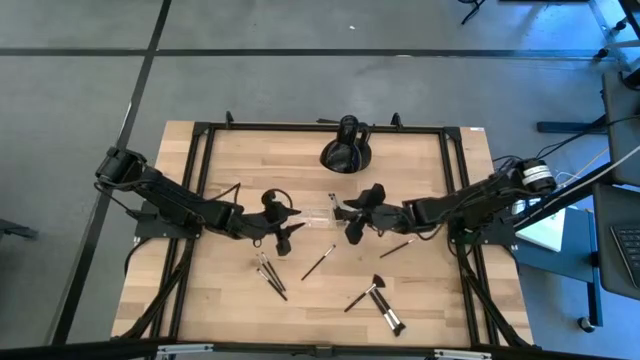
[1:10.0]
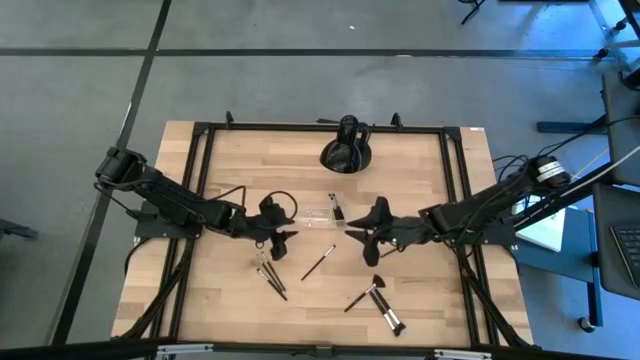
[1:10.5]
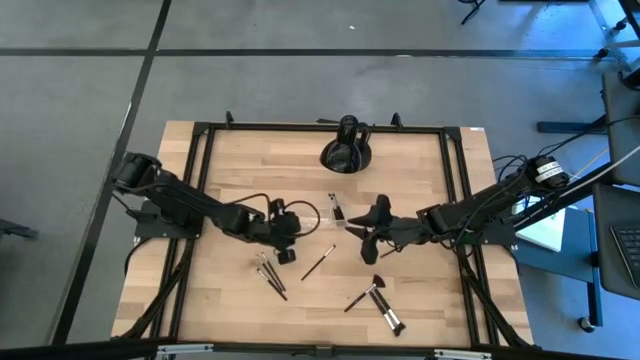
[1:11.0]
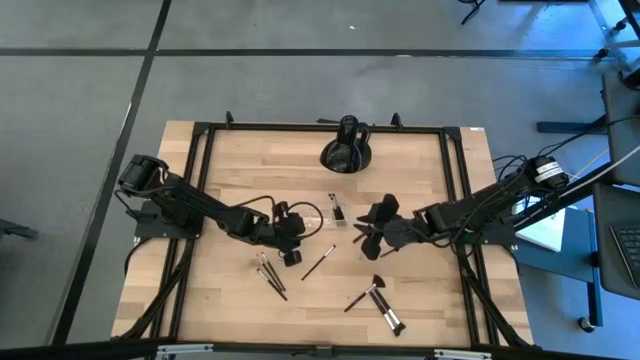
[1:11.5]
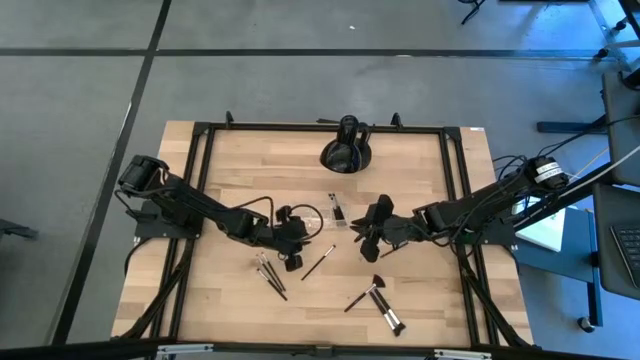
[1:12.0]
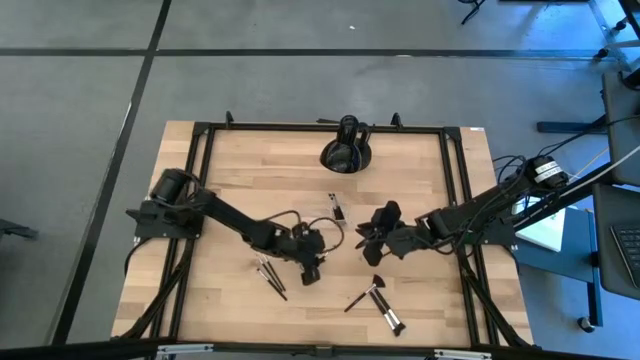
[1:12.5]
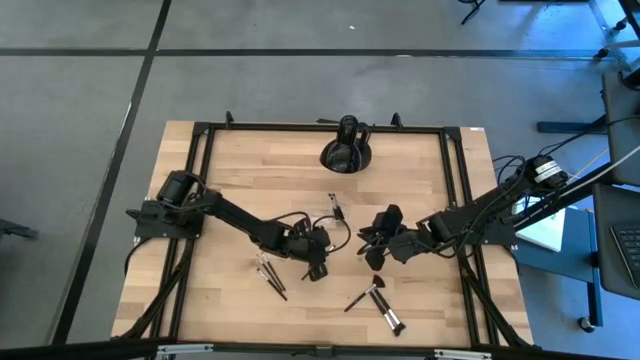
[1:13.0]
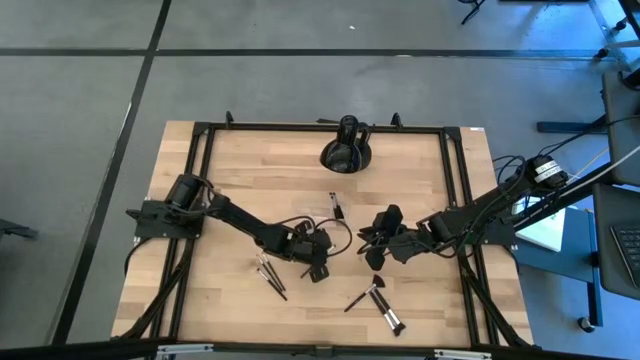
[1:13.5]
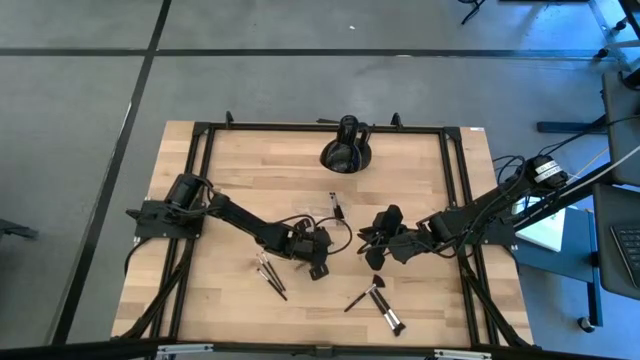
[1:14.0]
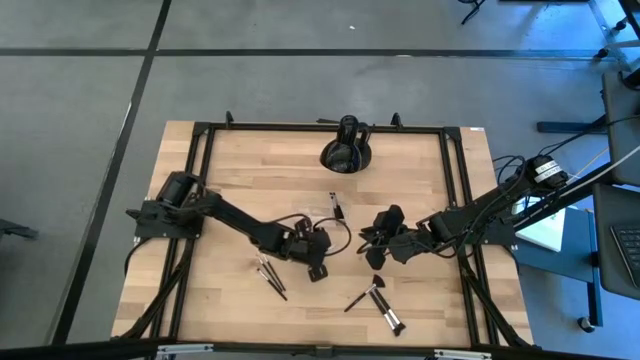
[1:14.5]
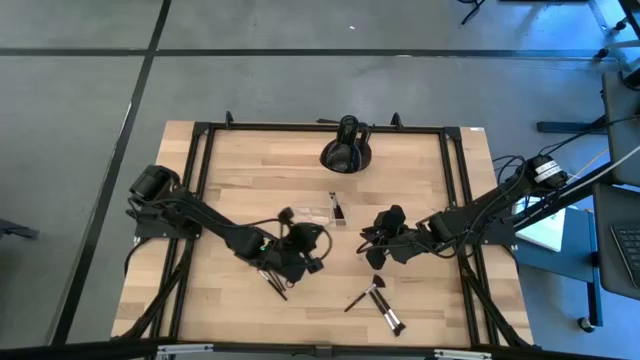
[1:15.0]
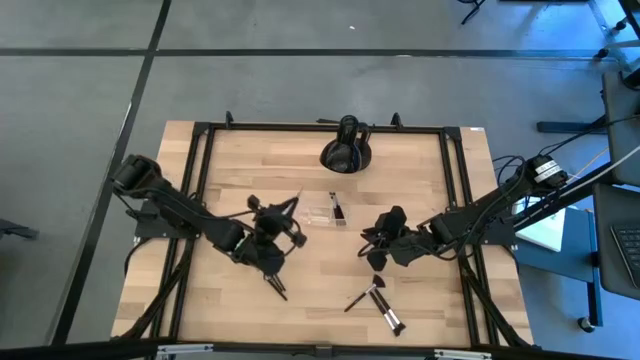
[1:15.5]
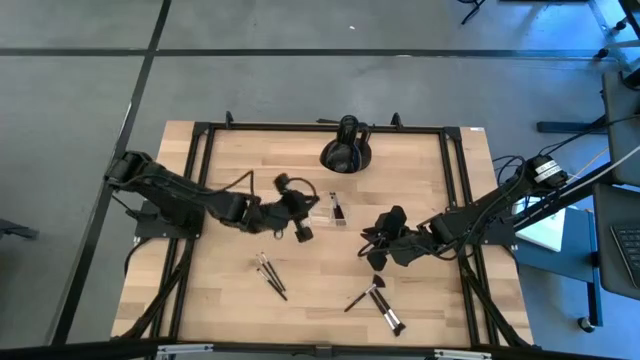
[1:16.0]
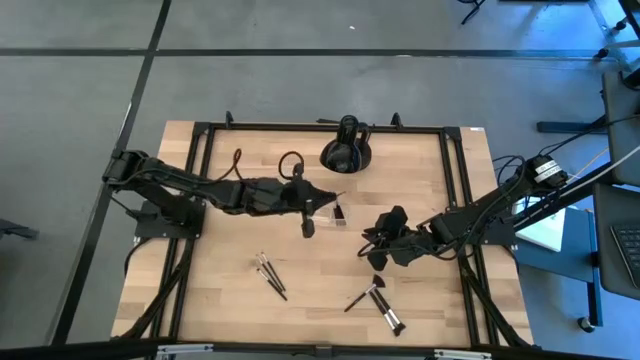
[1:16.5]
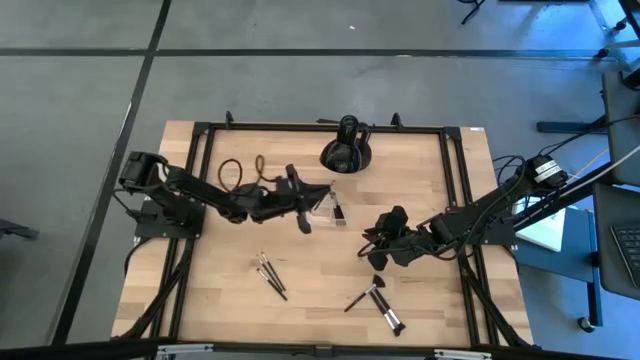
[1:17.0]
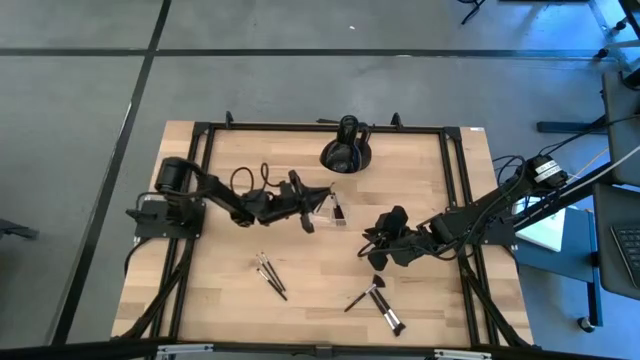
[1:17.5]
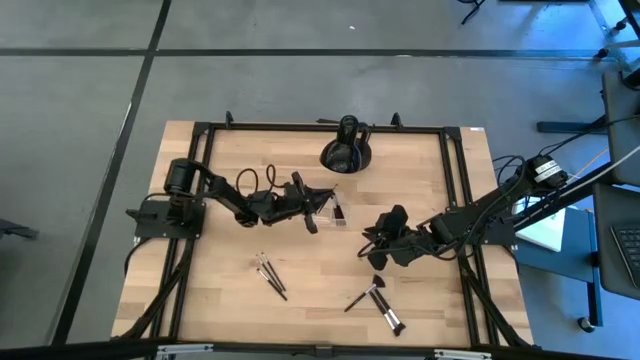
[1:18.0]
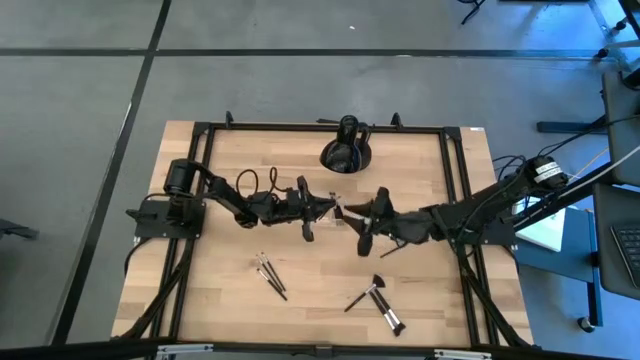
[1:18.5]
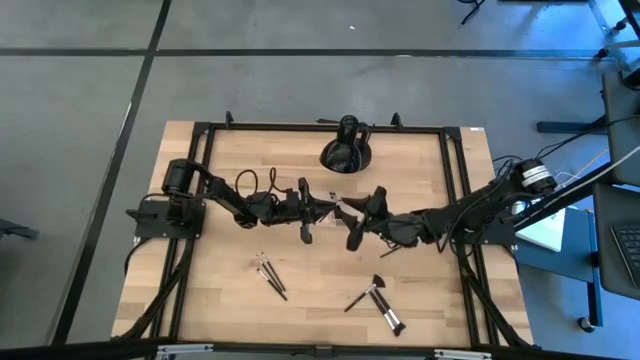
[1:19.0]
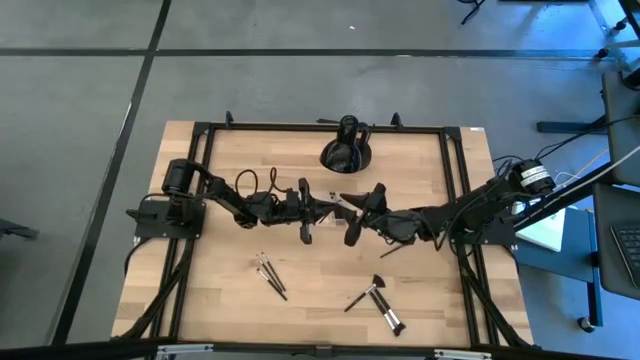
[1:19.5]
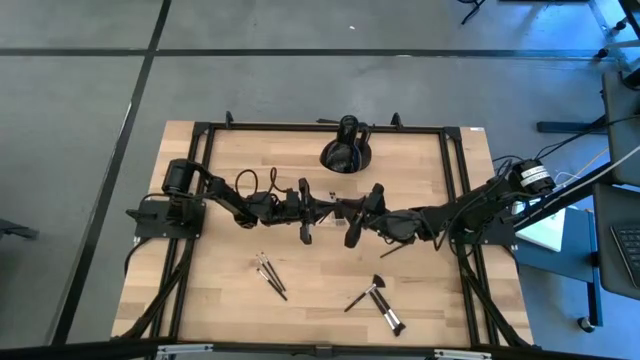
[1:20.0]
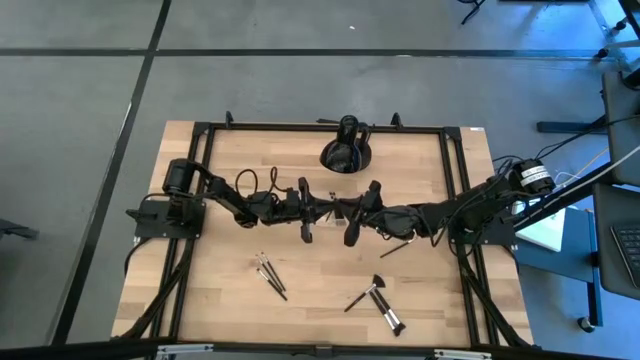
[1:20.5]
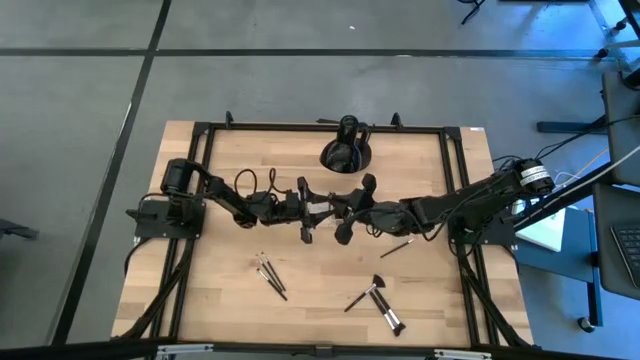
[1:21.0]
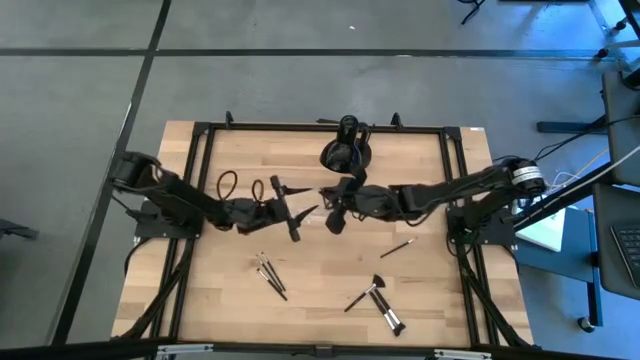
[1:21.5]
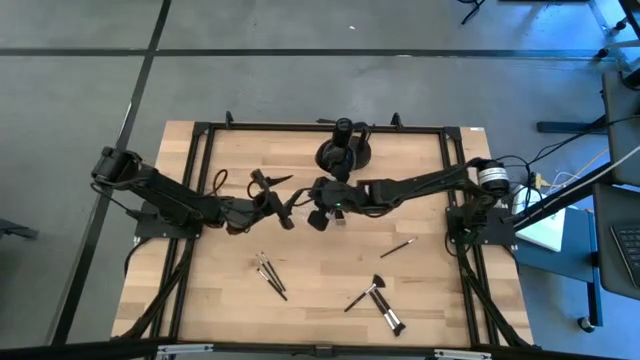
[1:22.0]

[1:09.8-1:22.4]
Task: Pick & Place Makeup Supplies
Put the makeup brush into the transparent organizer

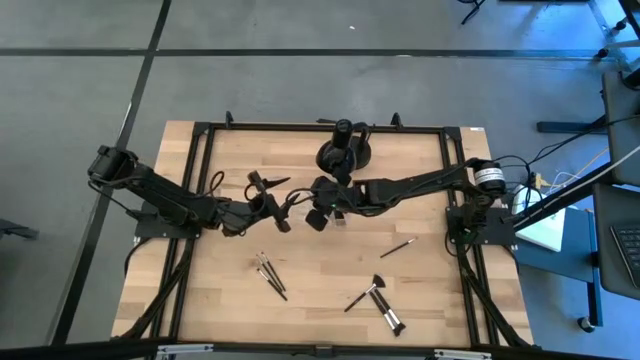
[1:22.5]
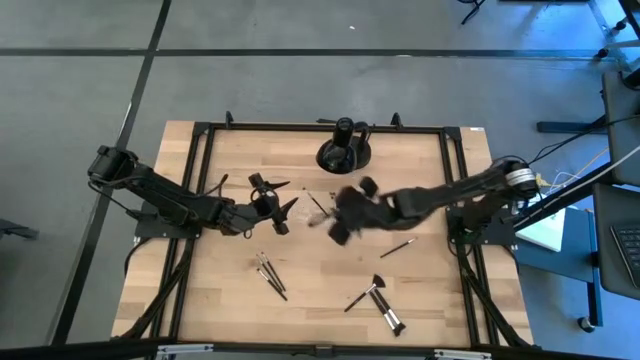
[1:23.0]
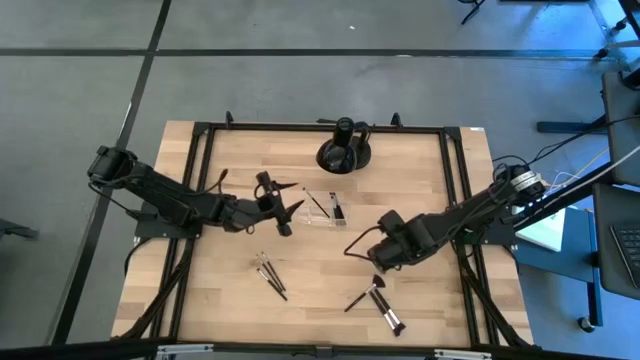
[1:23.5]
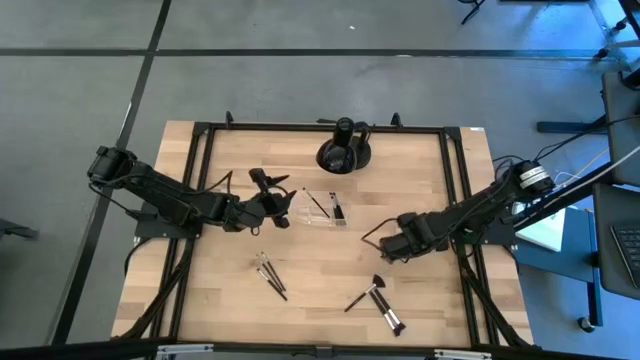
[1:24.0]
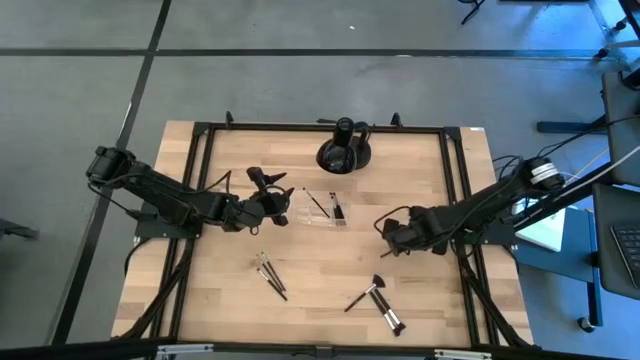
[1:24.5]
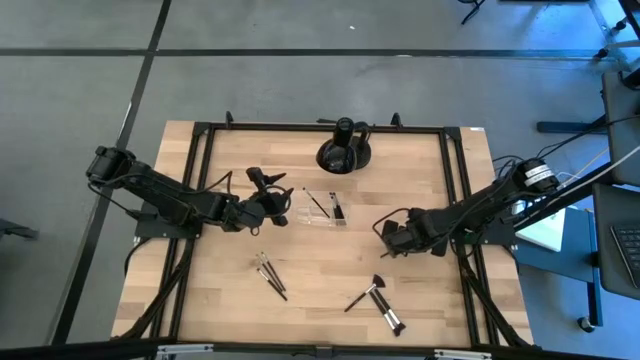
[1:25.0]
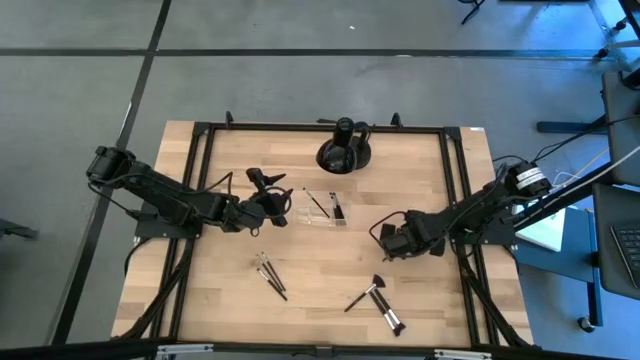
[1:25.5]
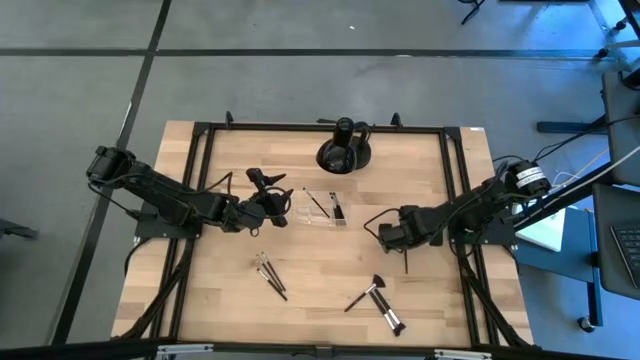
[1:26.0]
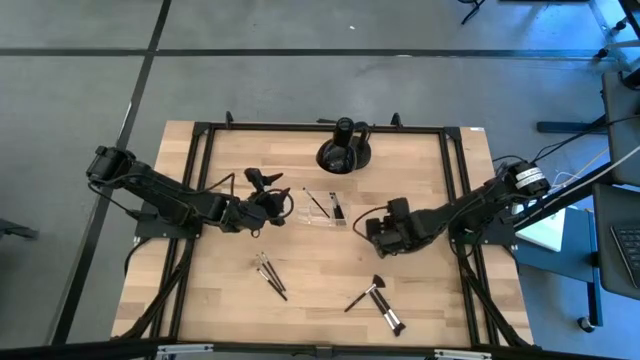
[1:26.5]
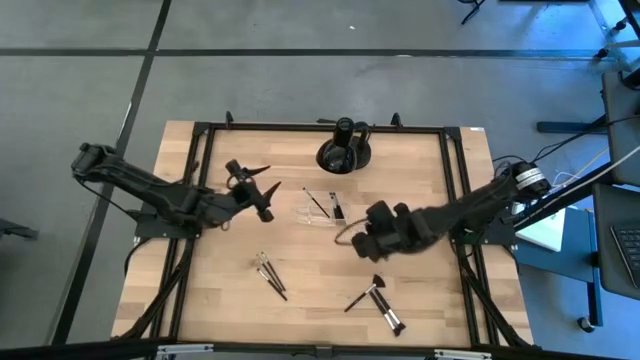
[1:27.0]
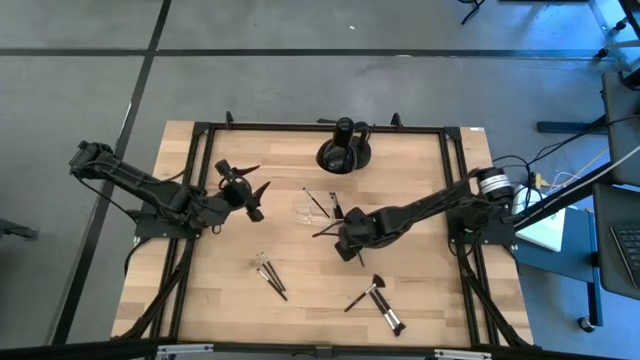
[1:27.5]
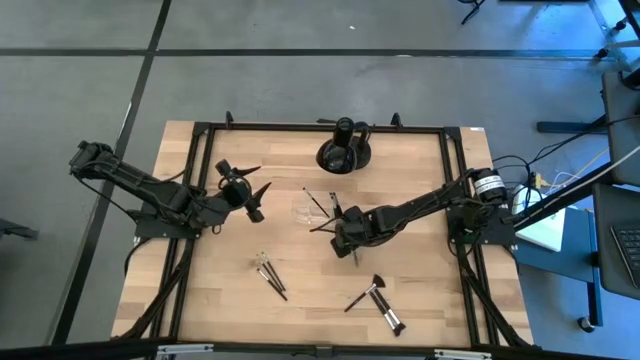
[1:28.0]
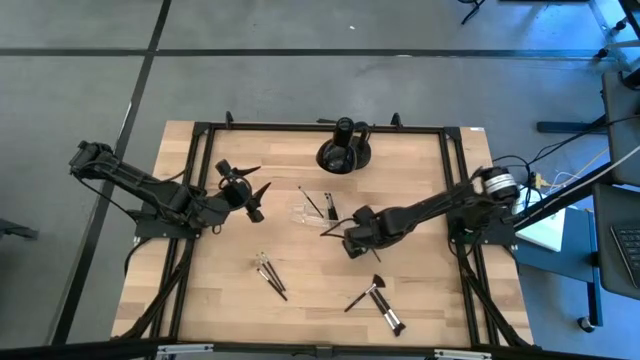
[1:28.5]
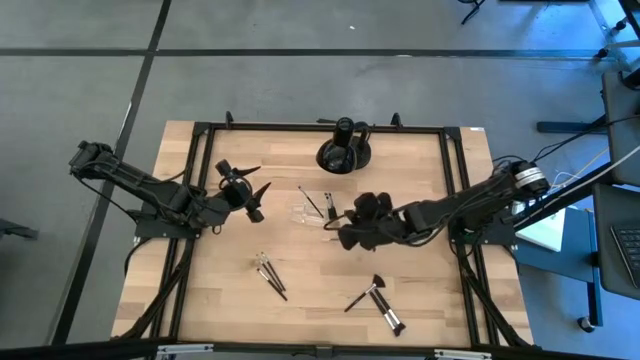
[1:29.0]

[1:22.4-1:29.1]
Put the makeup brush into the transparent organizer

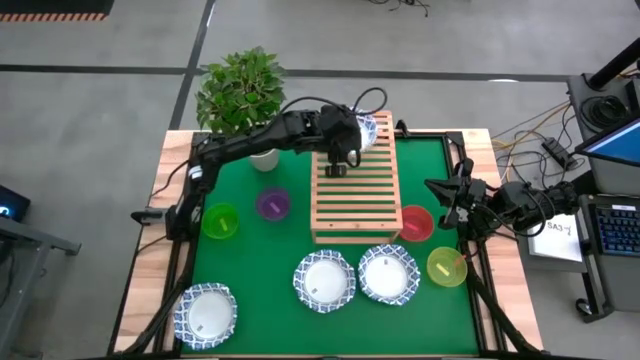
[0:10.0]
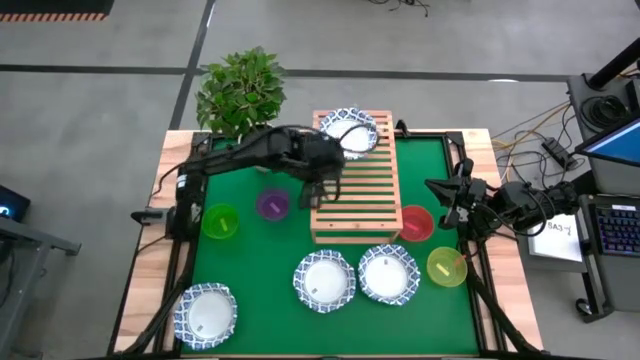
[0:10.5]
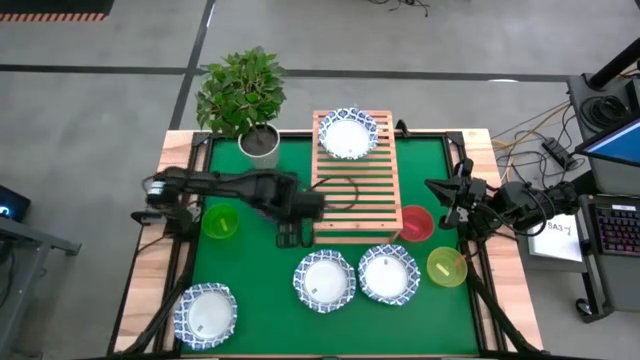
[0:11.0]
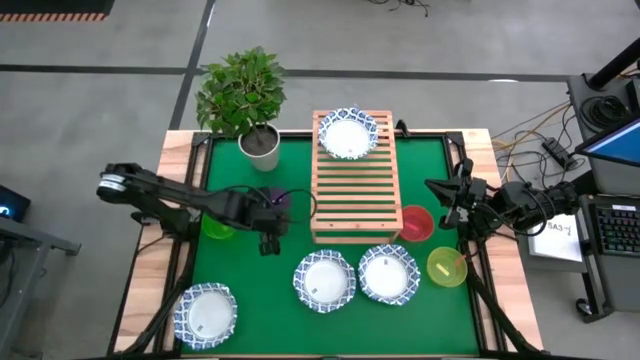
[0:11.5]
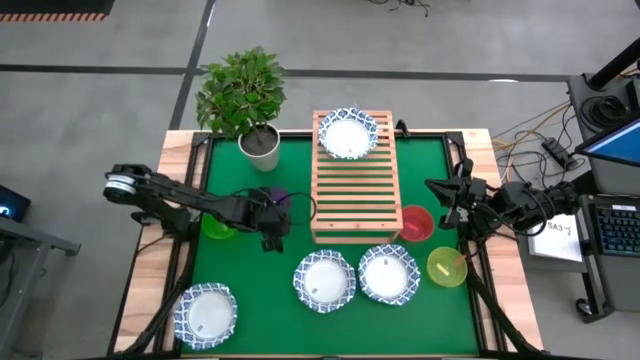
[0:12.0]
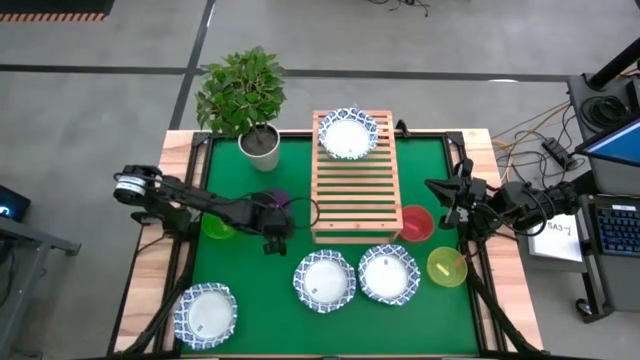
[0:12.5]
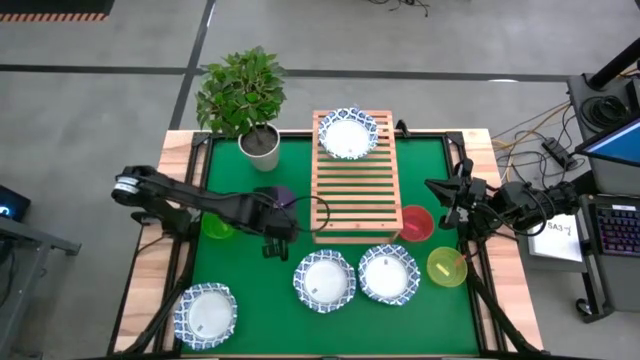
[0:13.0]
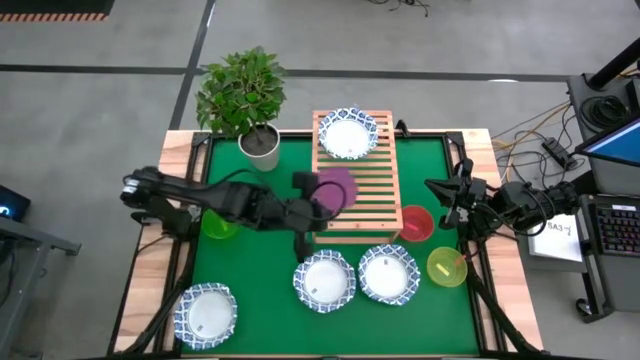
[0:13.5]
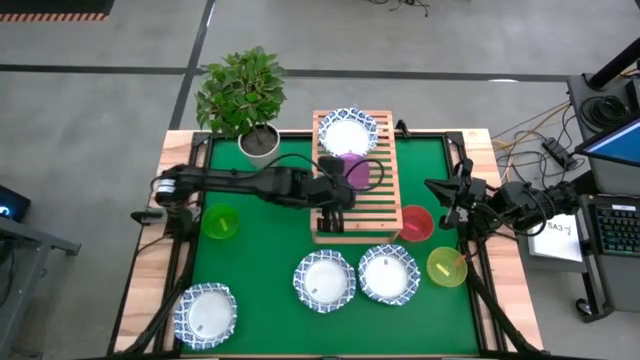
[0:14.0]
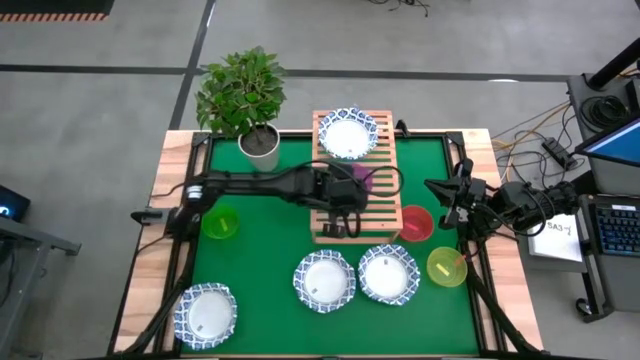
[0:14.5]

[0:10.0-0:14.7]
Task: Place and stack bowls onto a shelf
Put the violet bowl on the shelf
